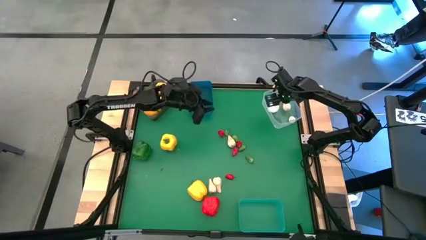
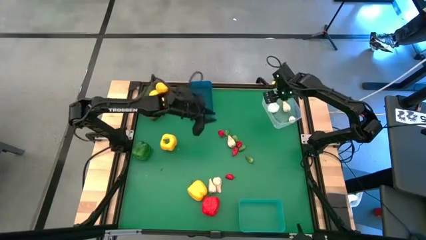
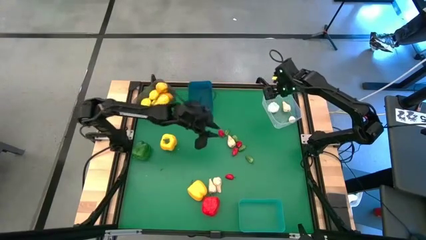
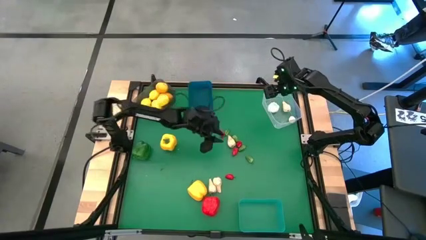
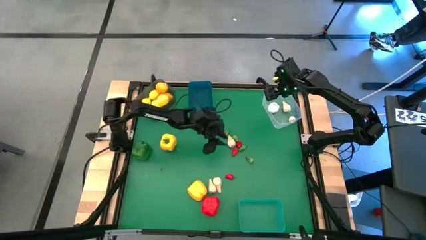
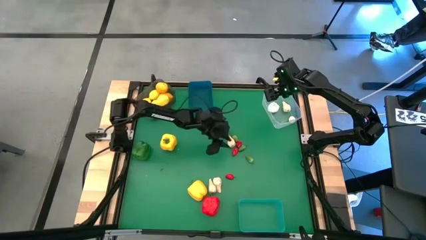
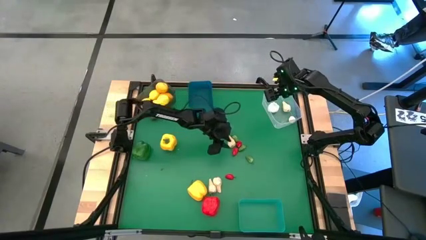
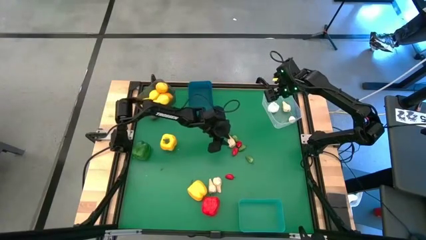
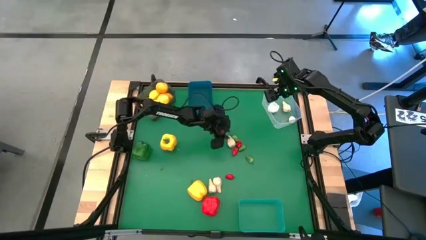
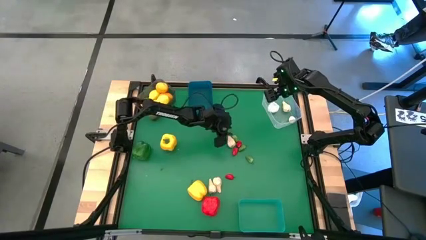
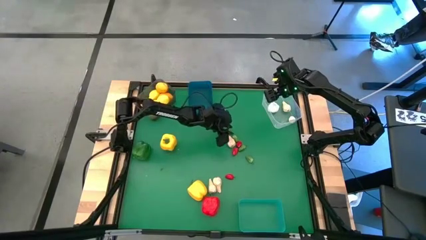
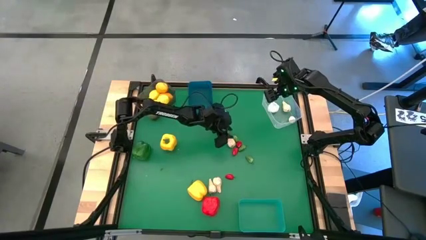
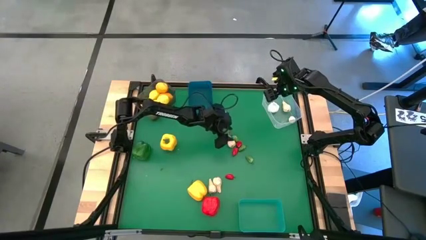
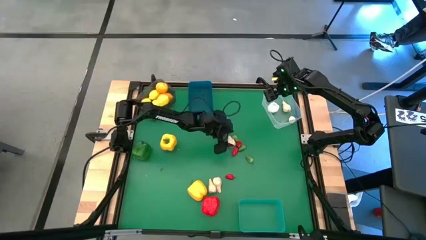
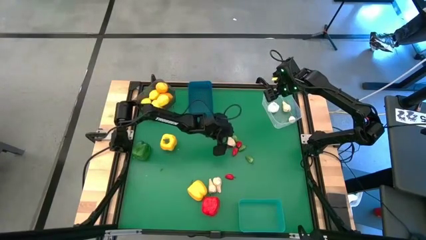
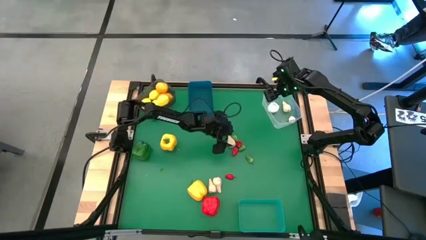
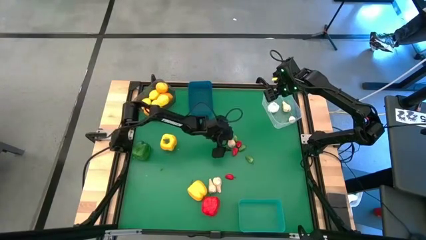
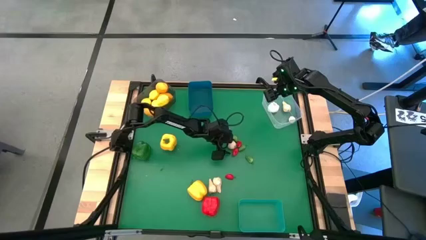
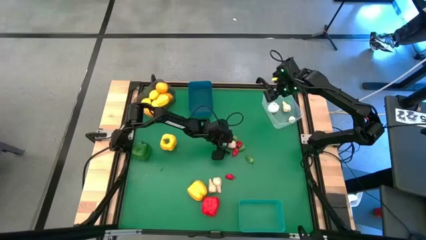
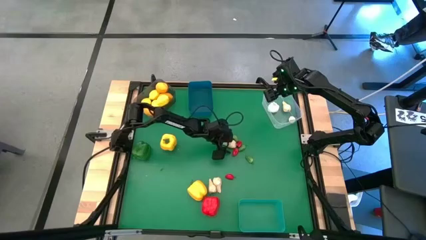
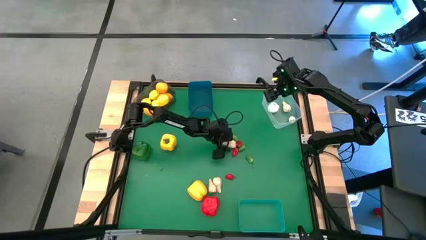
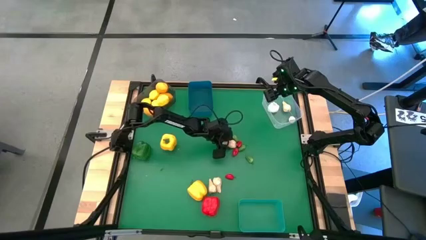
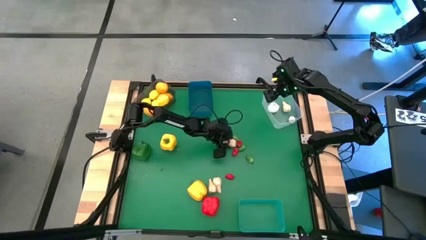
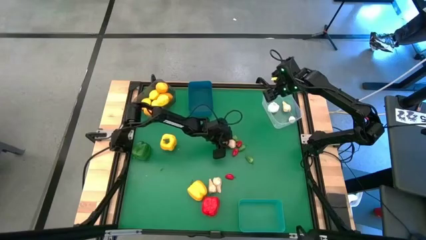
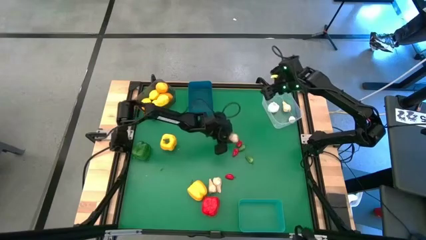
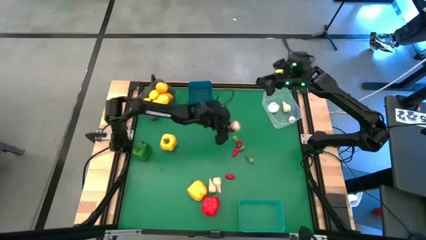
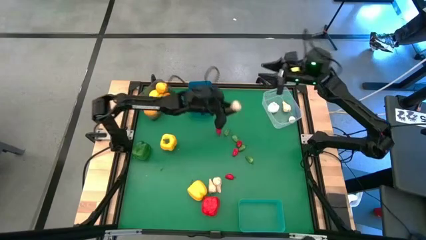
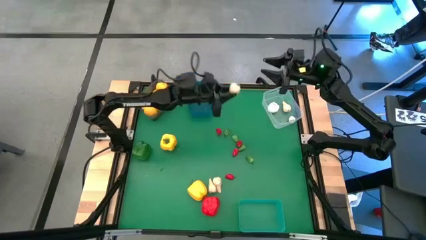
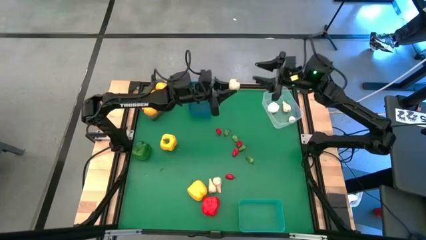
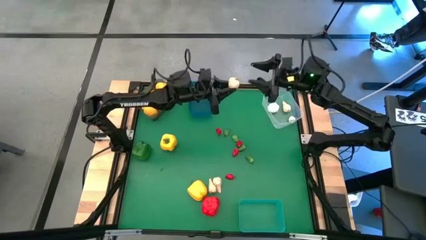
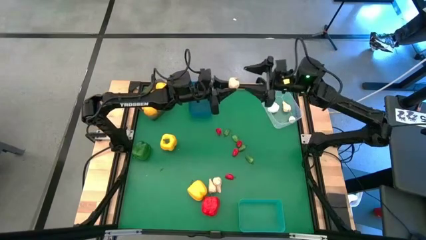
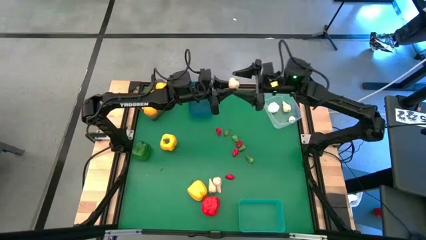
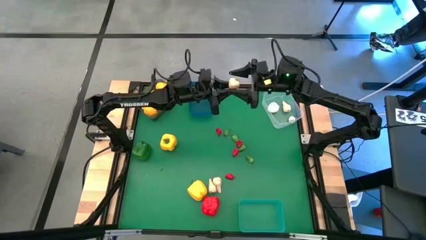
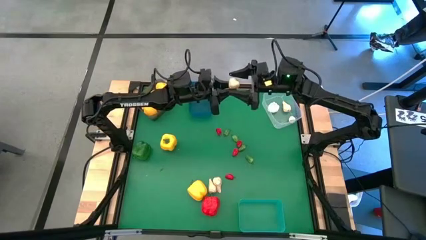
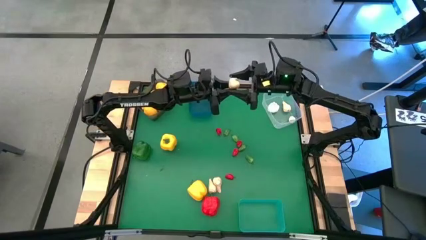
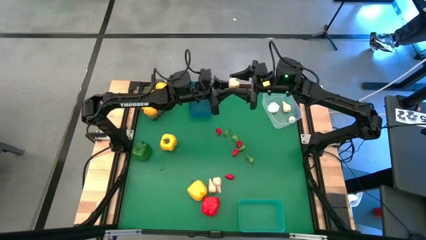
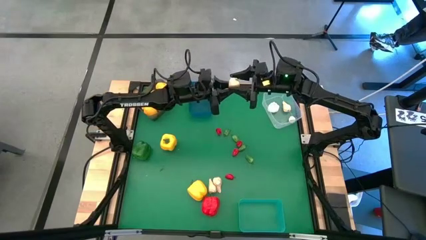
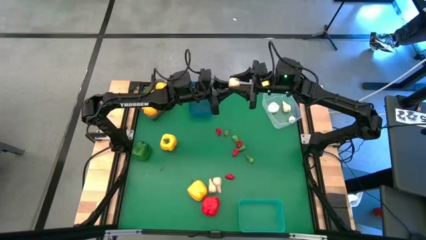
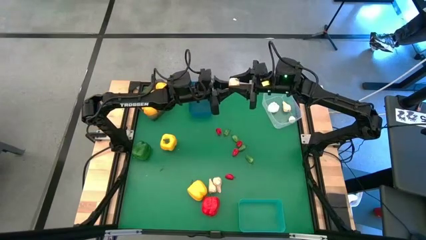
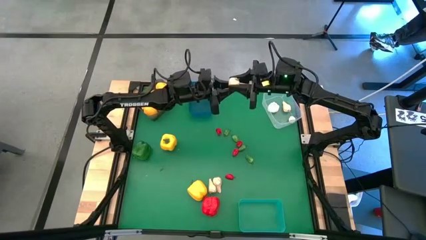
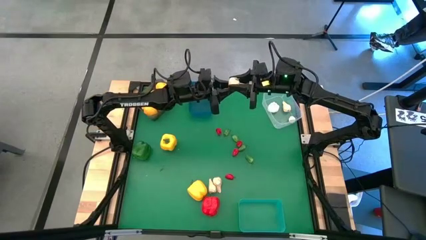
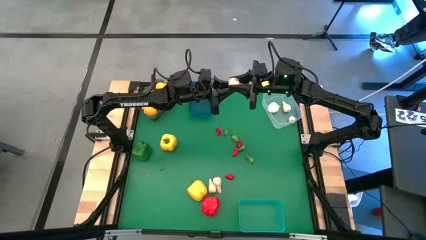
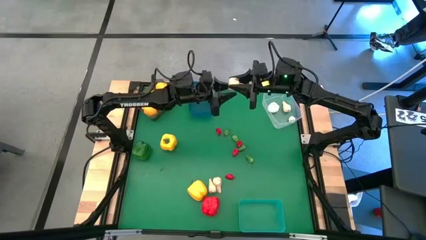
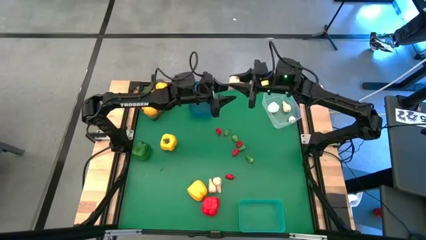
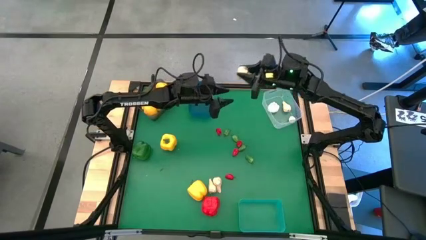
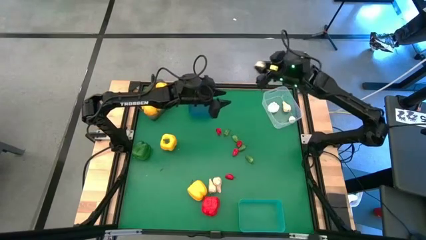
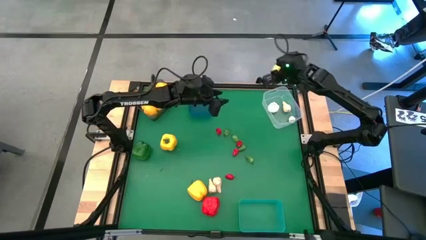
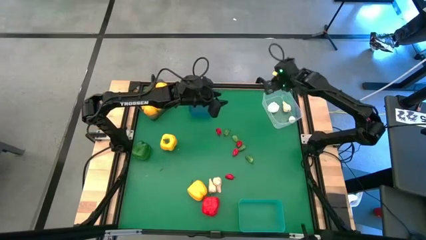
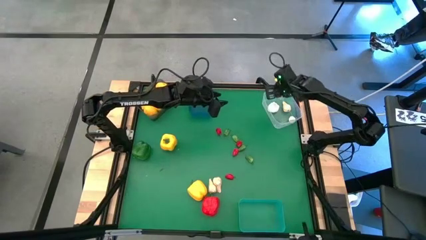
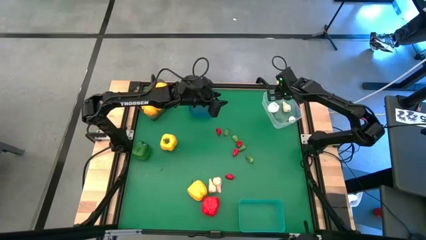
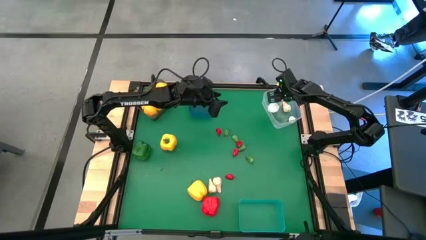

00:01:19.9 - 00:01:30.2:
Task: Sort produce into baskets
Put the white garlic into white transparent bin

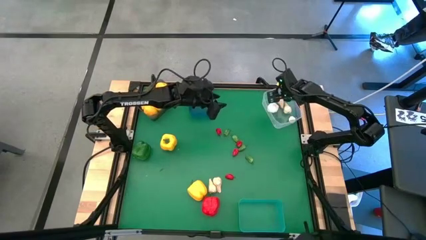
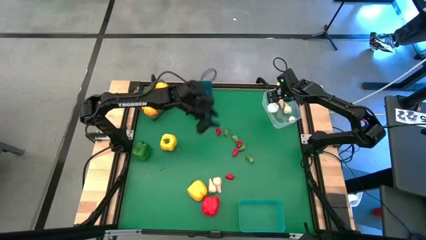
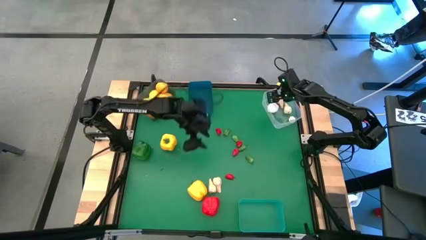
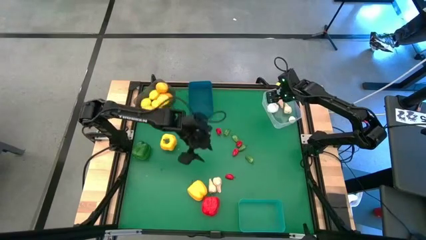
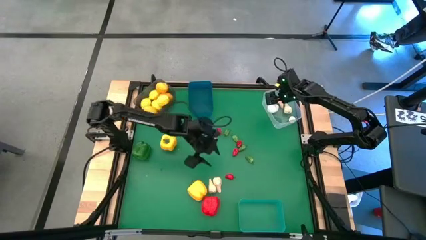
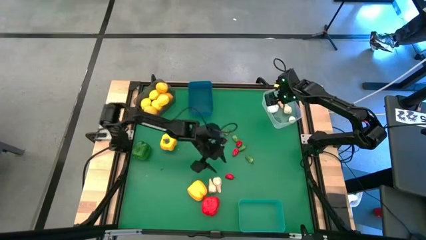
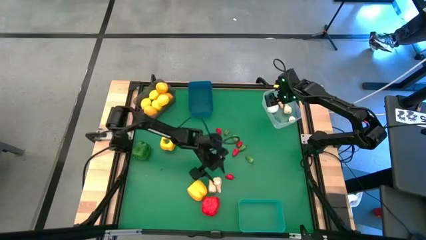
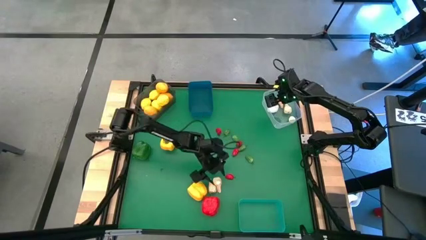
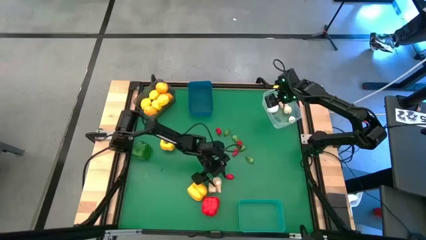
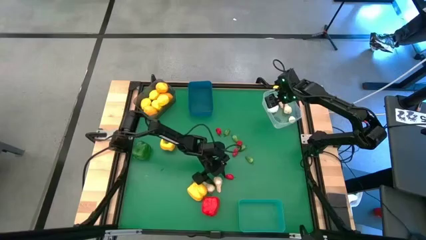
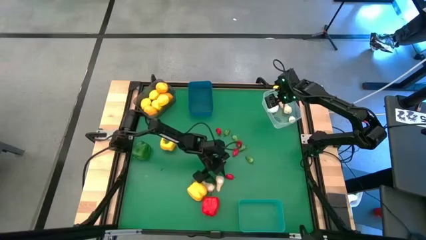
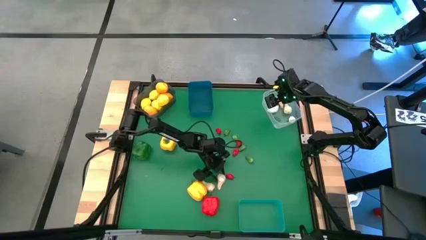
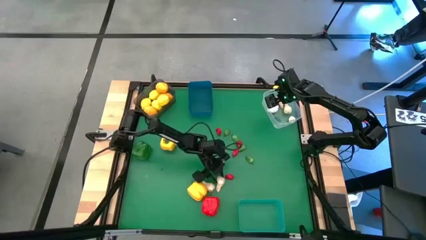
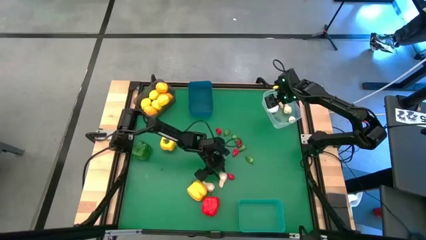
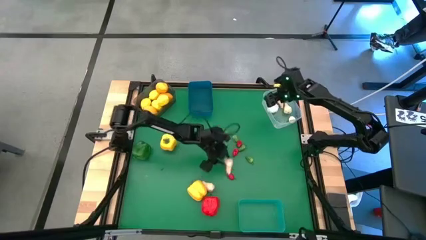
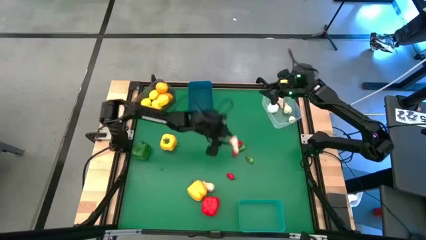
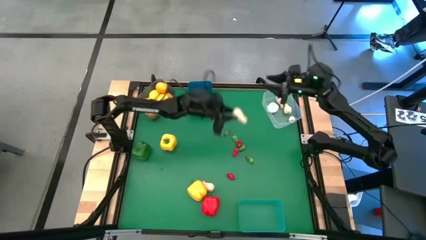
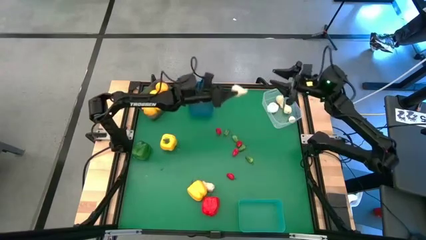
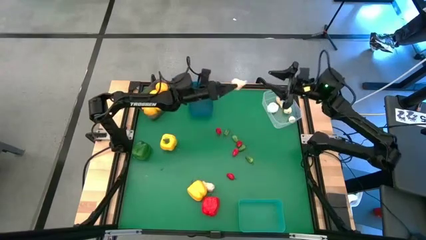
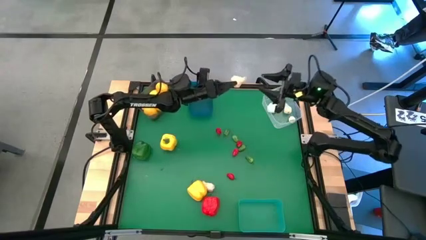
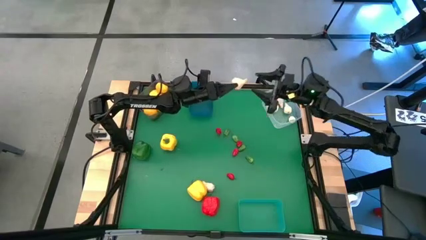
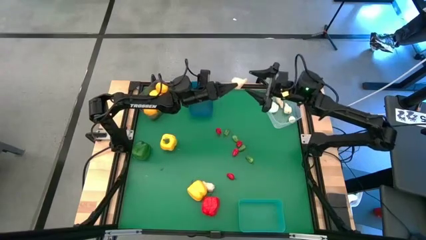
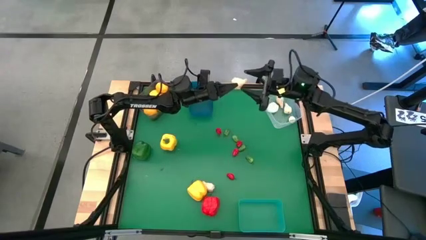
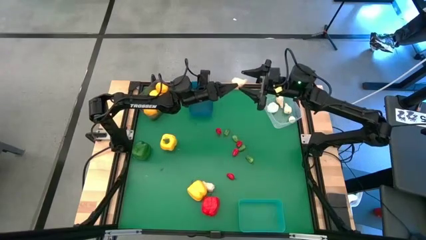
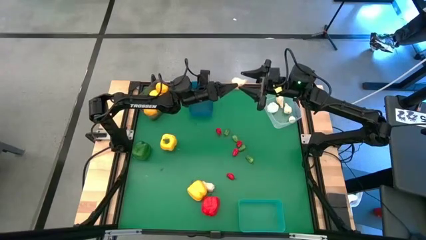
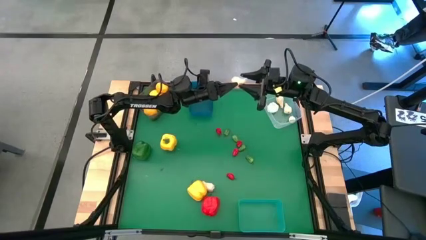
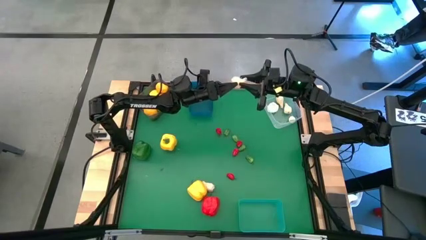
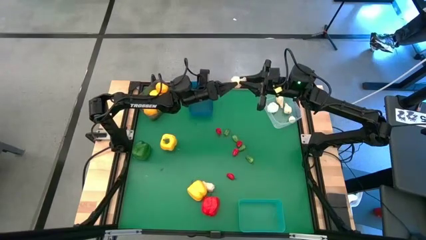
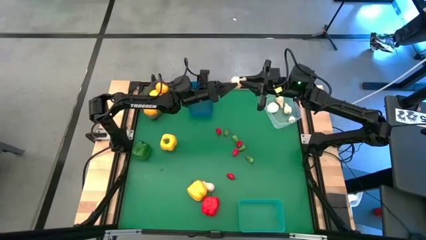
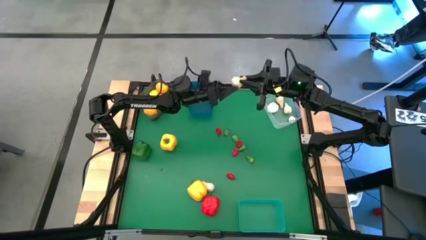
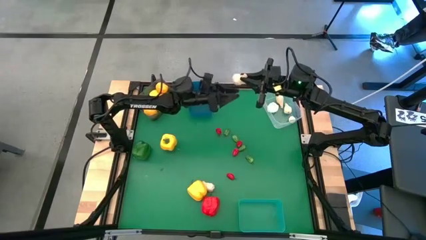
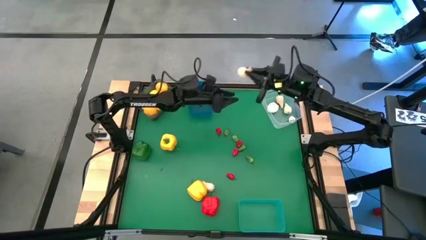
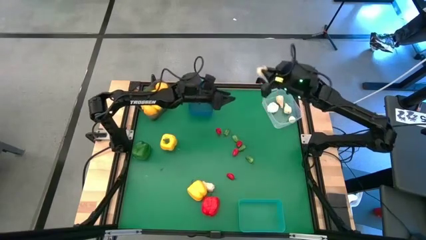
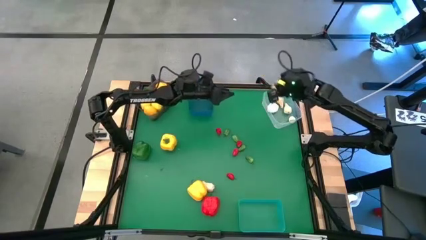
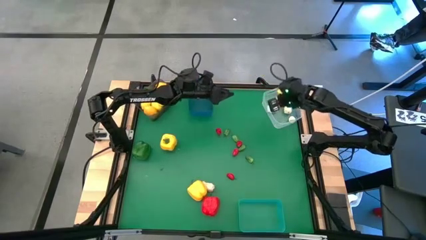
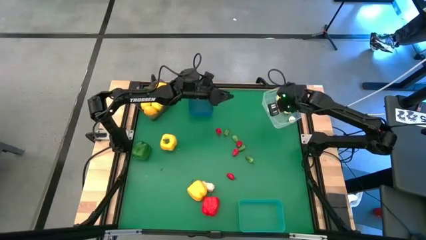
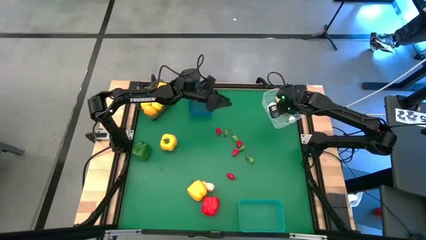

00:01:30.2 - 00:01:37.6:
Put the white garlic into white transparent bin
